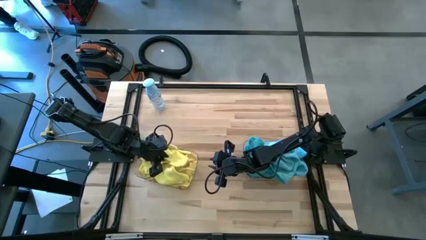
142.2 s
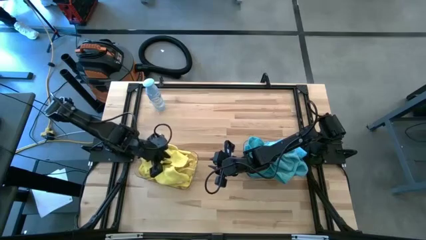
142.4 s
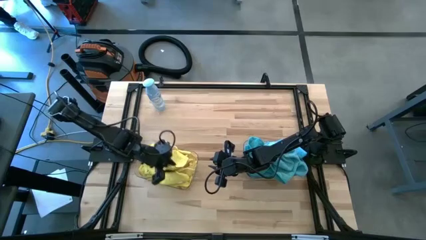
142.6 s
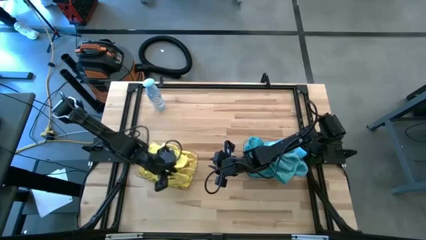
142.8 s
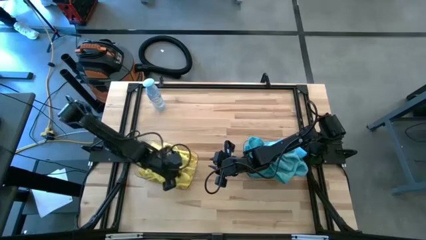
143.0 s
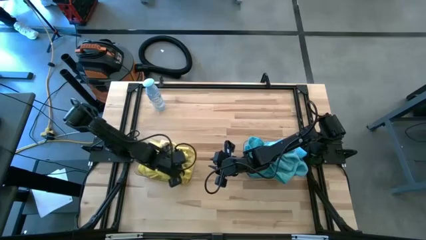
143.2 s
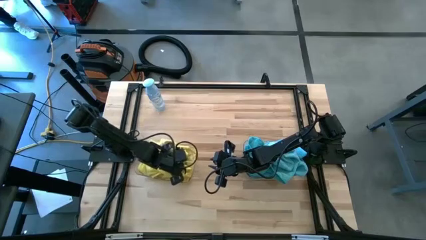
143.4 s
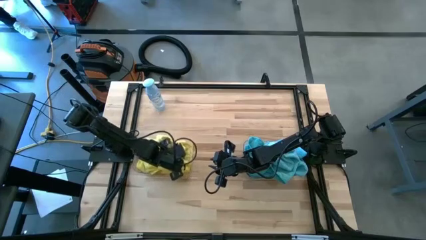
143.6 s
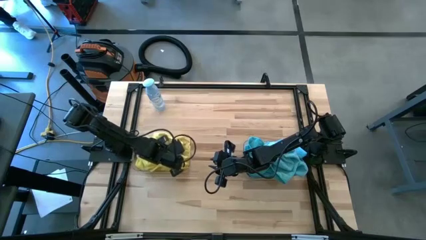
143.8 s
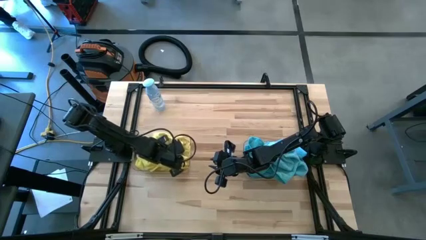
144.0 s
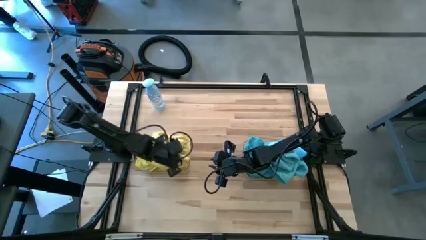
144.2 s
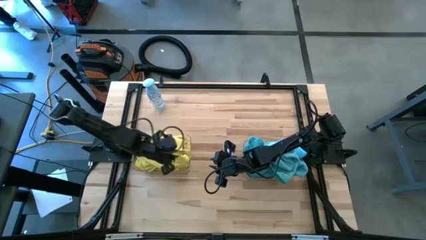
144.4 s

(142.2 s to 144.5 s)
Task: Sort microfiber towel by color & place in baskets
Adjust the left transparent bin

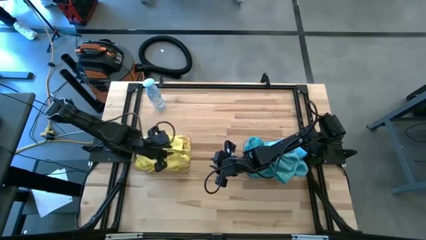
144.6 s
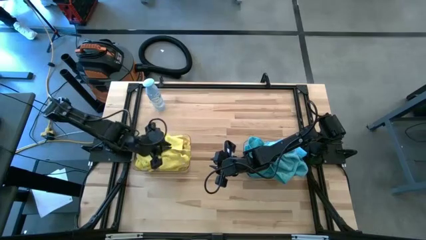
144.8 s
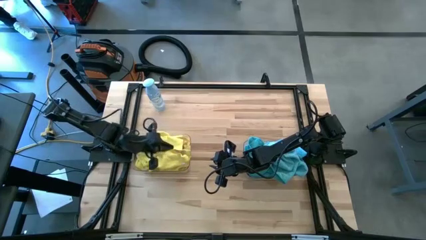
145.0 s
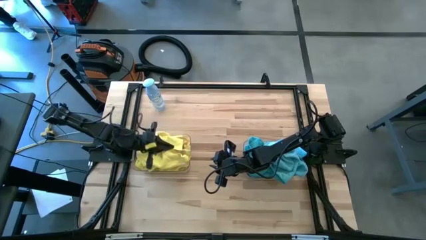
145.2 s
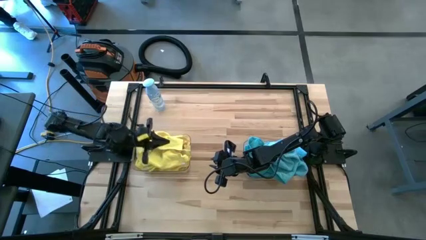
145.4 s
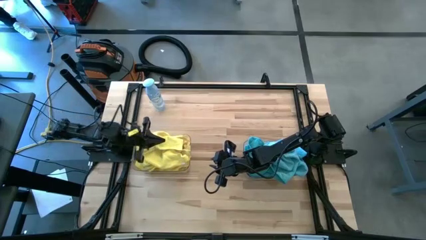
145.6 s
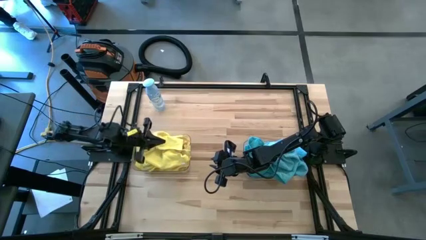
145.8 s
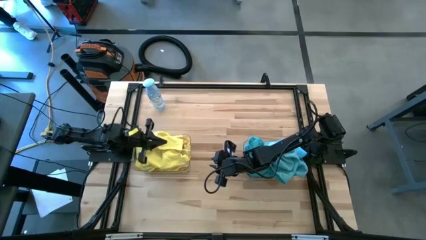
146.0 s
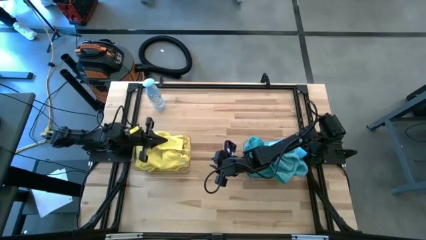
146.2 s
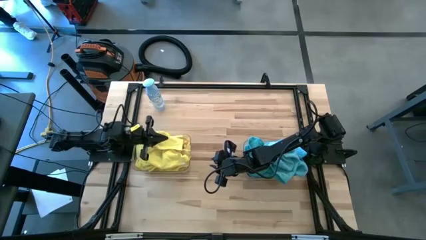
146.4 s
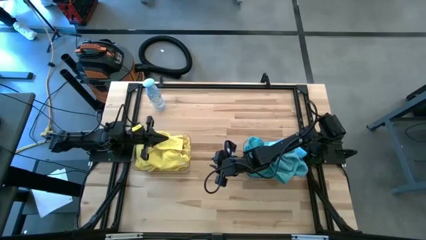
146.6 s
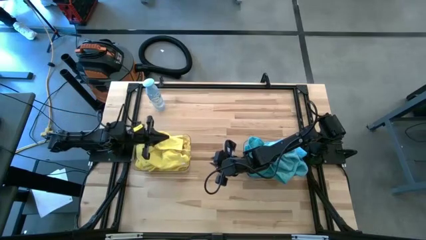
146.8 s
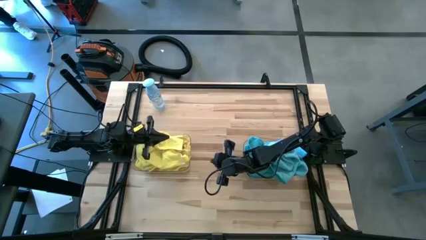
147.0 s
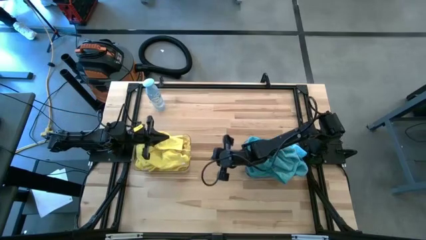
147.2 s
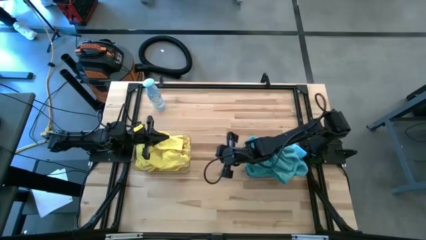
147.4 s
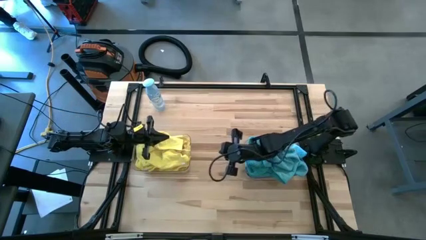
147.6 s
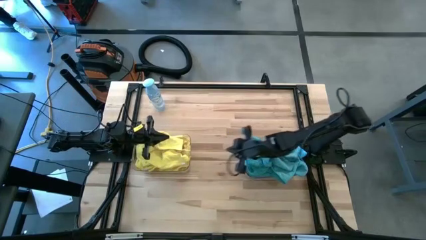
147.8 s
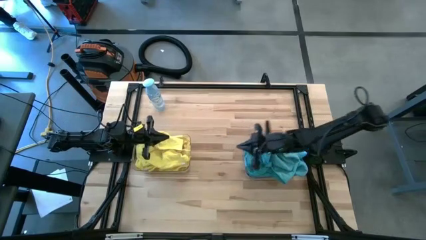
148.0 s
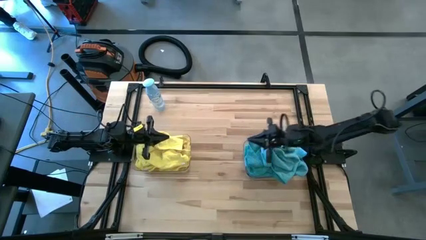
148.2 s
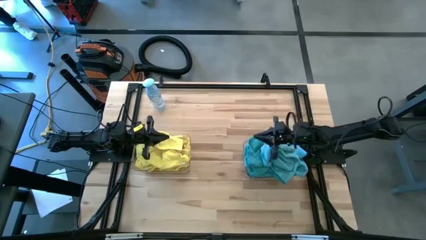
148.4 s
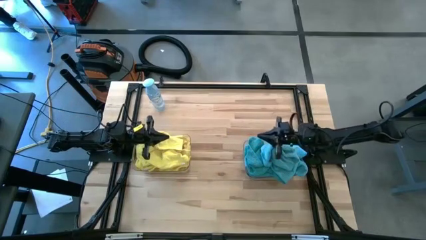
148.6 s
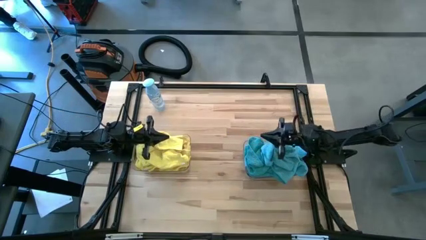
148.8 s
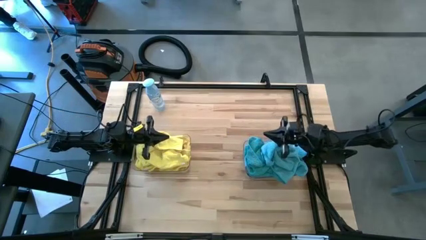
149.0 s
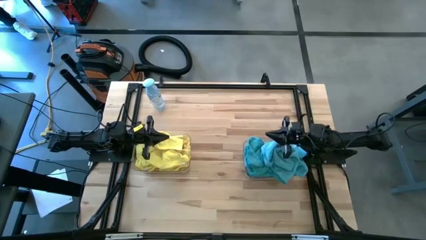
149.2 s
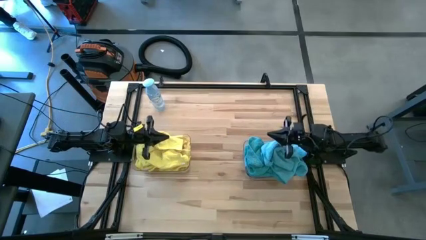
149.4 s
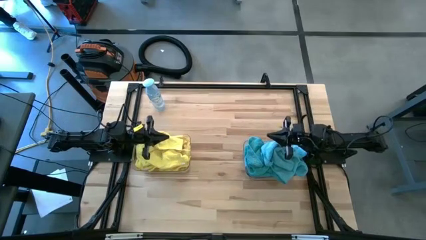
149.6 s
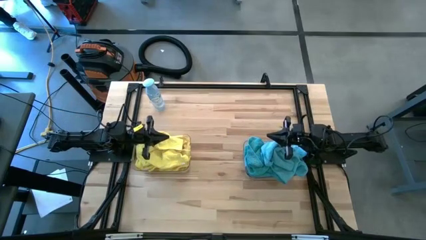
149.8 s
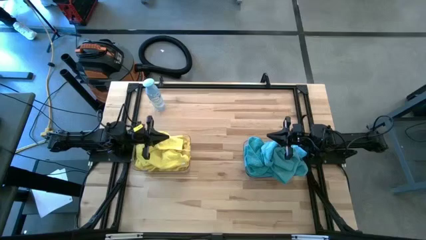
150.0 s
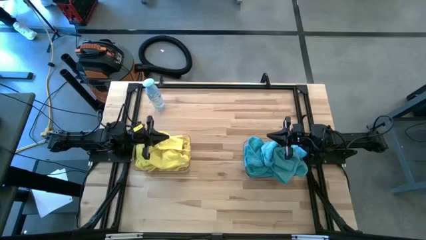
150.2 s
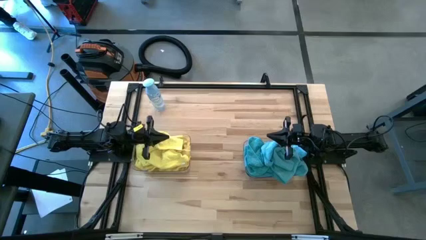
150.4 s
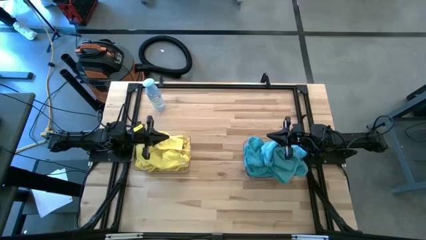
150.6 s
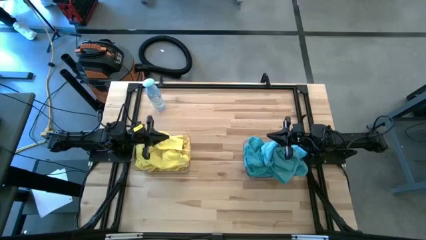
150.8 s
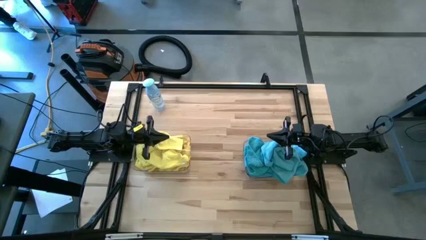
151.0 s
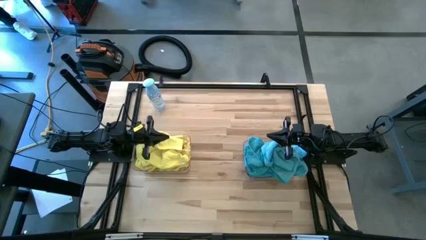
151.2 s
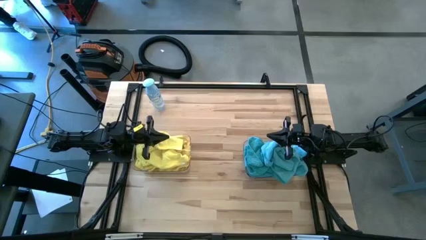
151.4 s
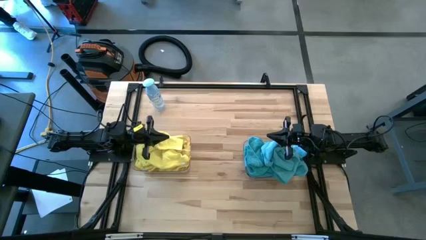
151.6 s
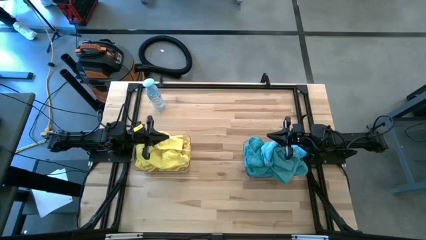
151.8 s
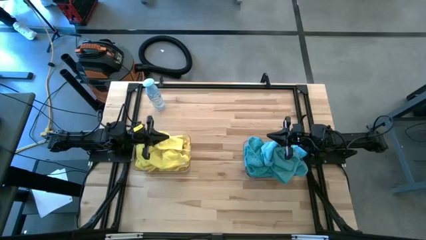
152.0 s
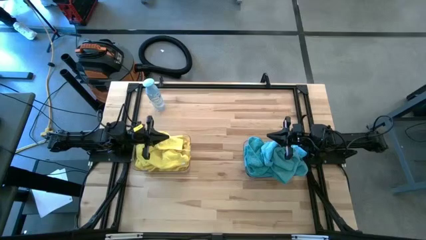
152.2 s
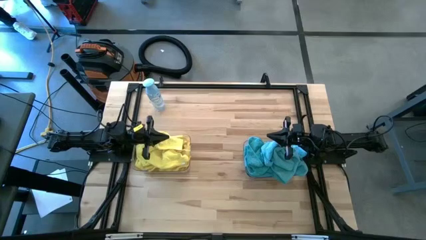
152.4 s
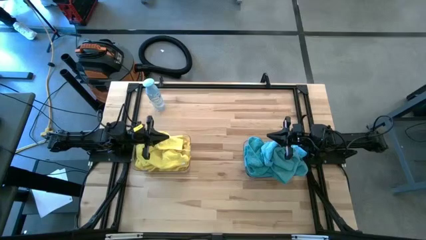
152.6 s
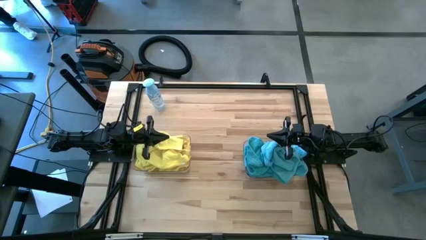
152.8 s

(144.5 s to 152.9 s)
Return to Home Position
